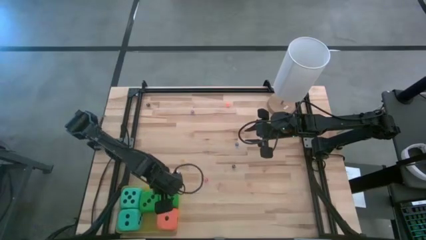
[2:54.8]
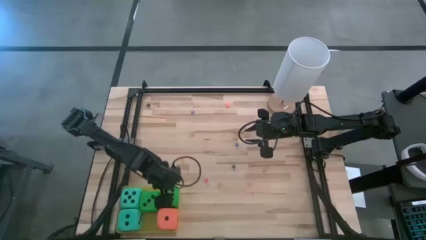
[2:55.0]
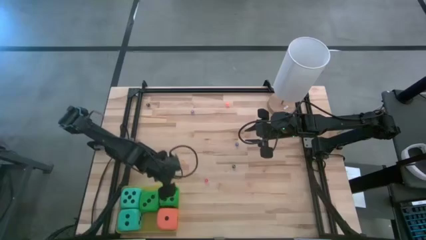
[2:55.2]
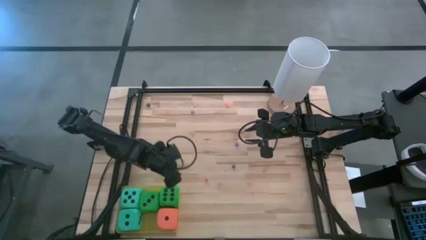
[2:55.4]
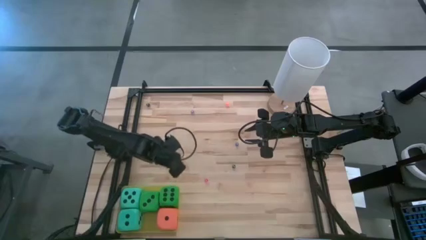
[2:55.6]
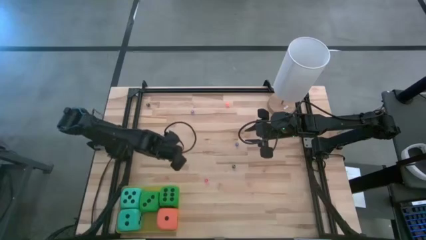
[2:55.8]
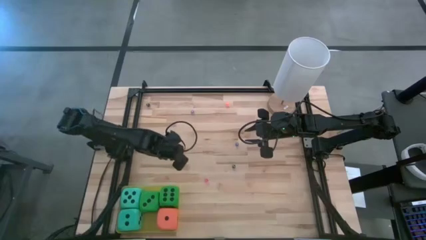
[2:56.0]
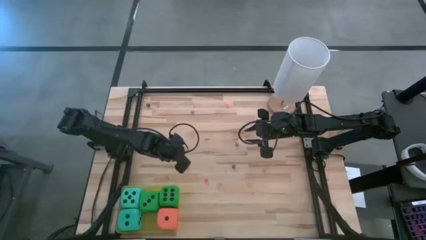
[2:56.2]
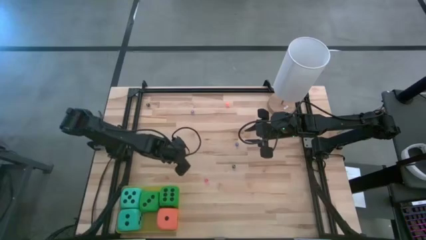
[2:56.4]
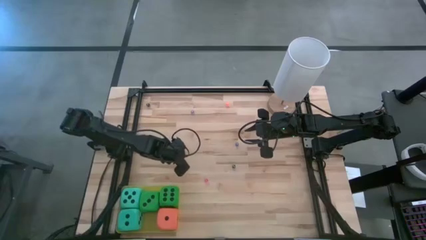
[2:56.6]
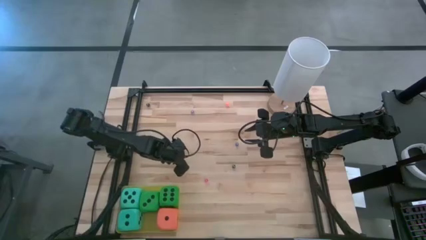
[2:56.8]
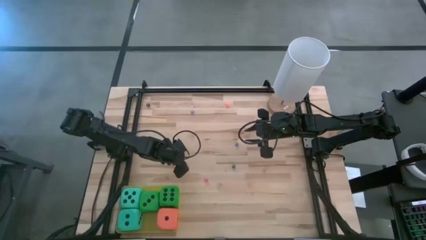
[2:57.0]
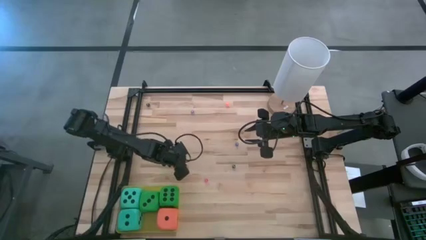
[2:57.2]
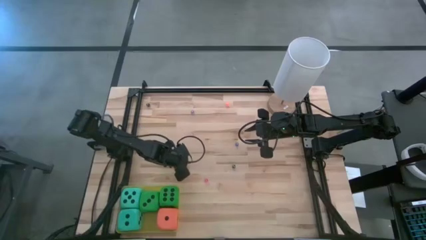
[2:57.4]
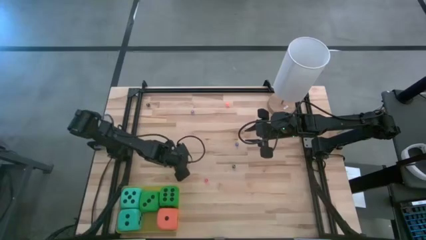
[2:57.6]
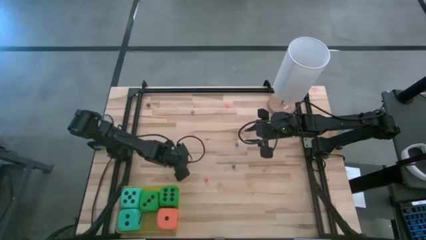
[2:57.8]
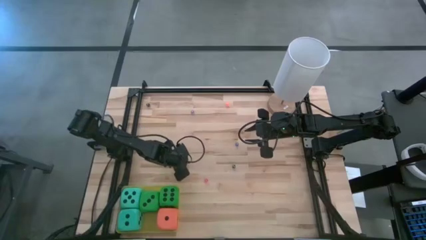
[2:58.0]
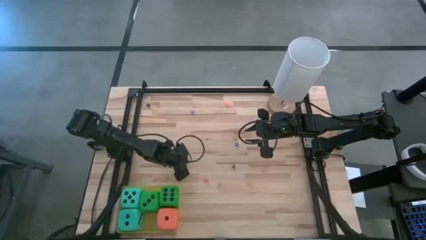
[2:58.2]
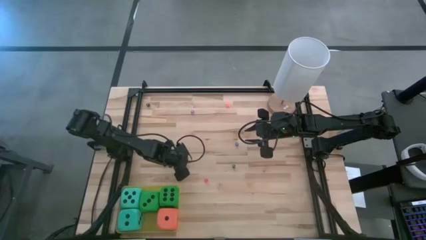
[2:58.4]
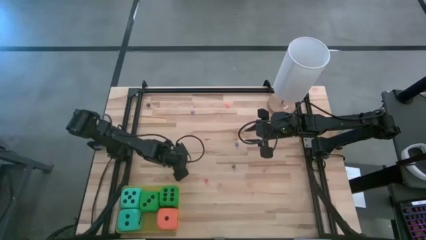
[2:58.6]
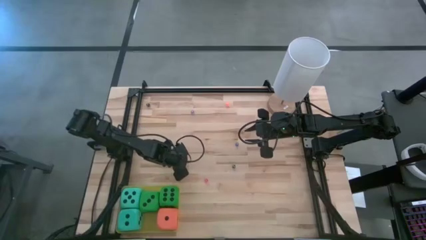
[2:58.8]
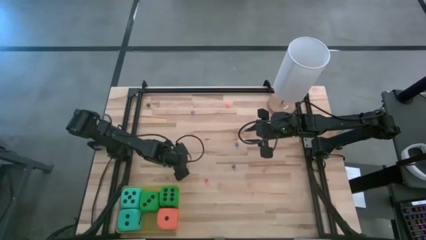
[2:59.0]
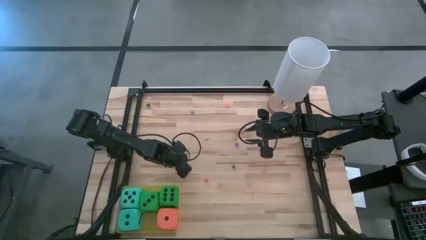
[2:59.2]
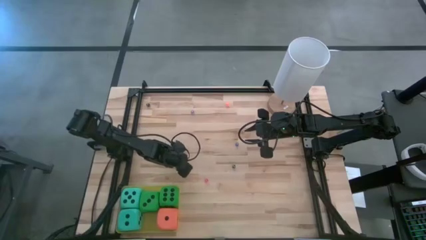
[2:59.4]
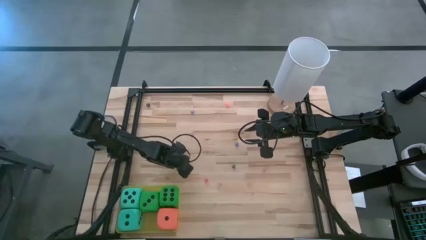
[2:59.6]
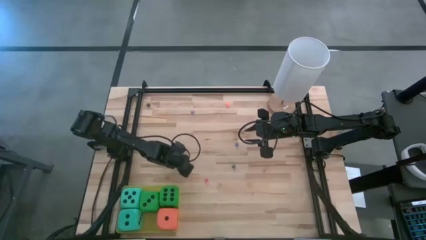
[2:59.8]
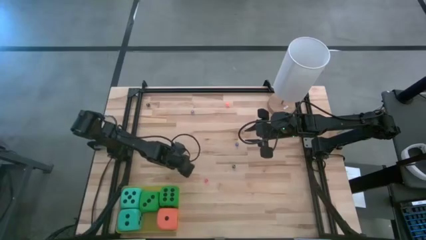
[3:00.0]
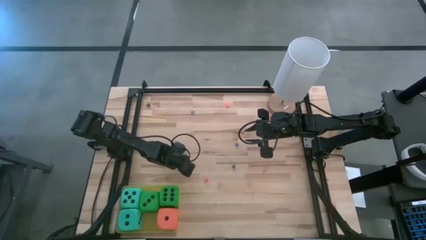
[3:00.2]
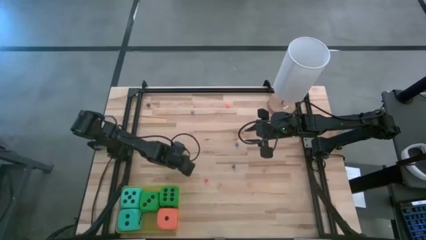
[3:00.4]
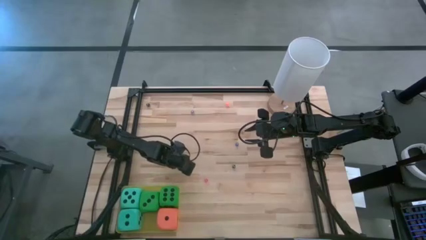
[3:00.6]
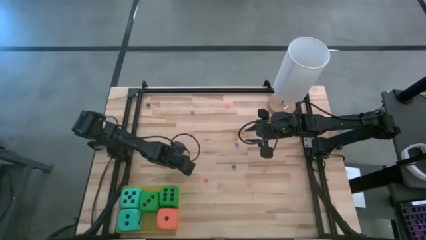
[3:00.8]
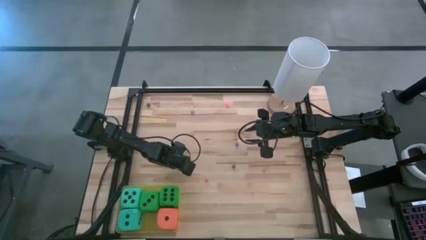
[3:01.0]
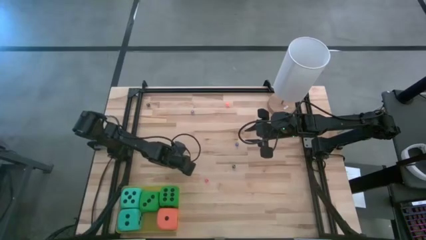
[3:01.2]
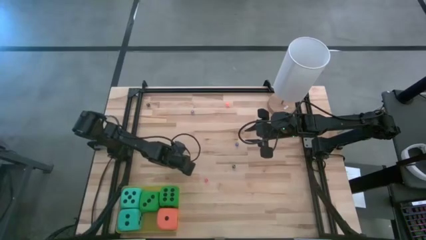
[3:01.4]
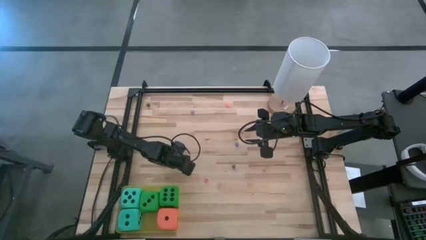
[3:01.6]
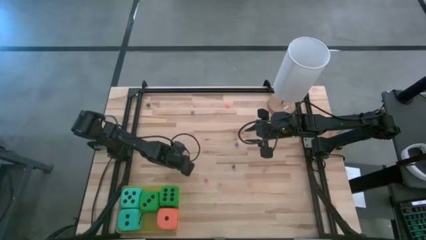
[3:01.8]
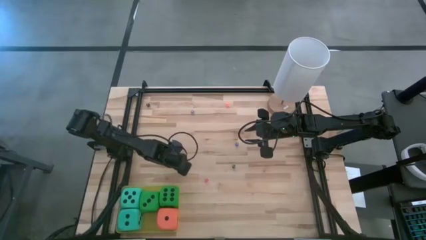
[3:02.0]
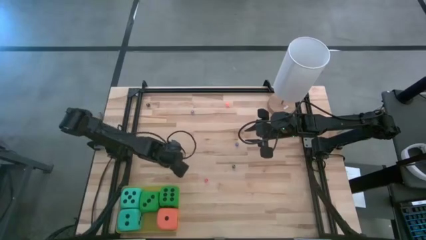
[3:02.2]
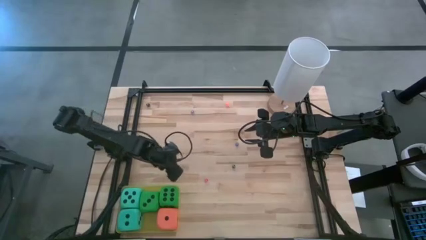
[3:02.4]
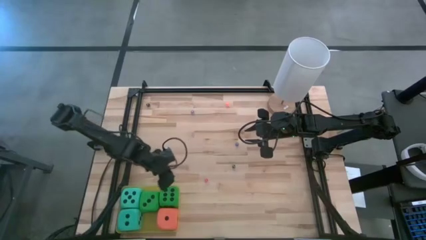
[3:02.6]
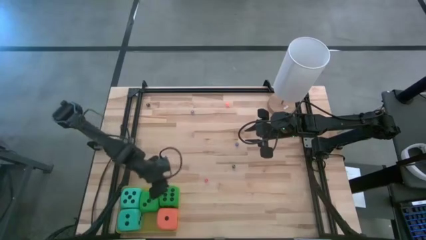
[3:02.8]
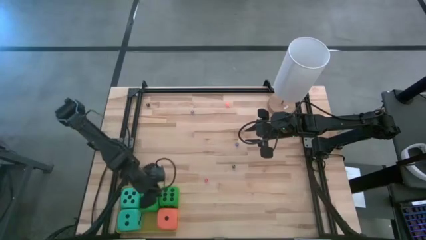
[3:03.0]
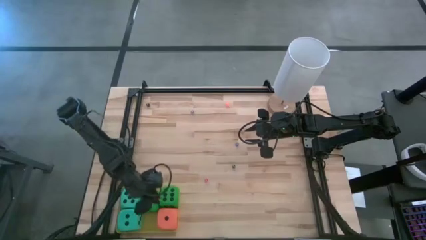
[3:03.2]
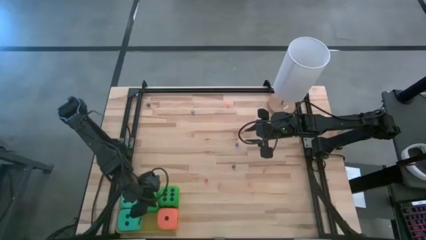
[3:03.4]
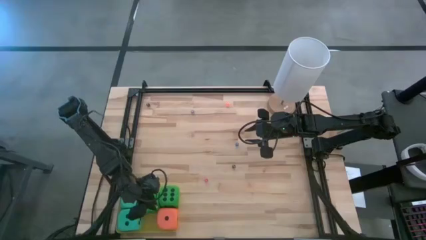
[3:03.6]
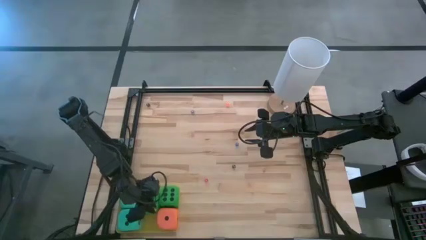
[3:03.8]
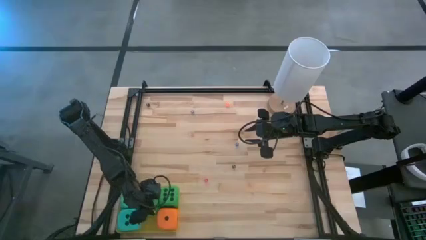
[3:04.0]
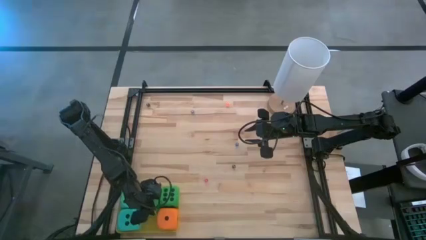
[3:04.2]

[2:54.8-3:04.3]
Task: Pick & Place Dice
Put the yellow dice into the yellow bin

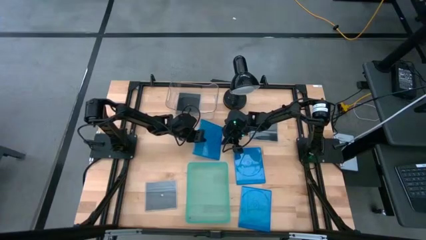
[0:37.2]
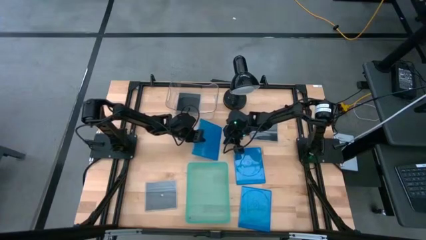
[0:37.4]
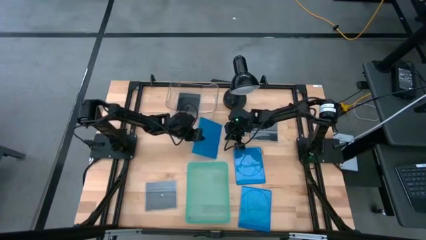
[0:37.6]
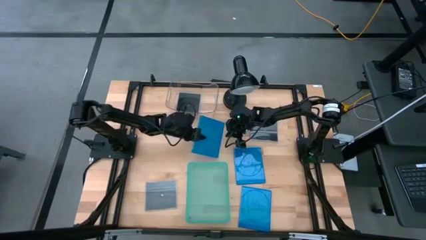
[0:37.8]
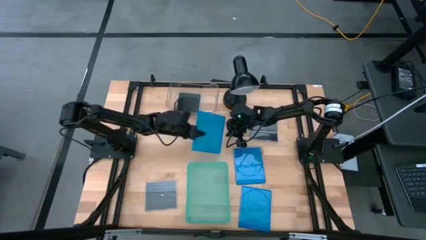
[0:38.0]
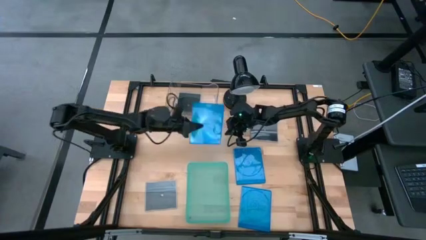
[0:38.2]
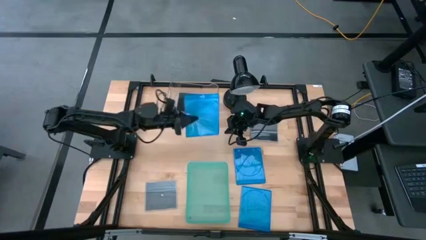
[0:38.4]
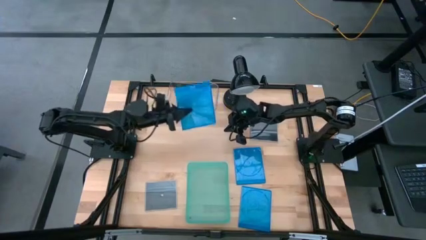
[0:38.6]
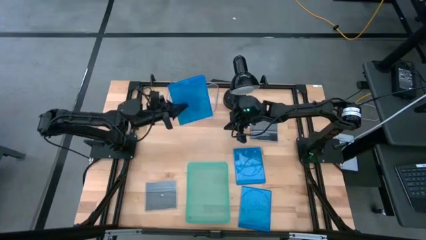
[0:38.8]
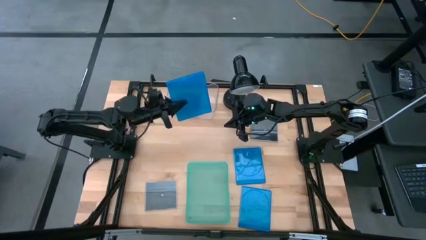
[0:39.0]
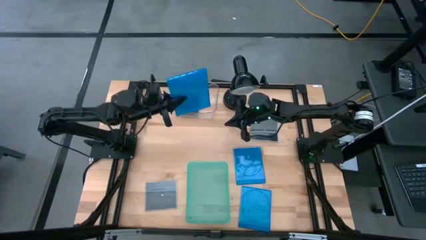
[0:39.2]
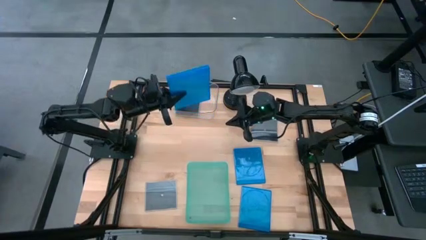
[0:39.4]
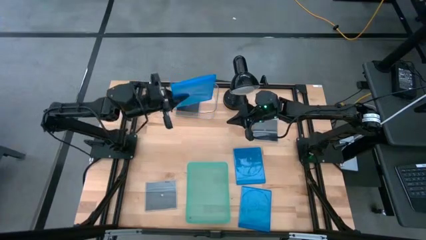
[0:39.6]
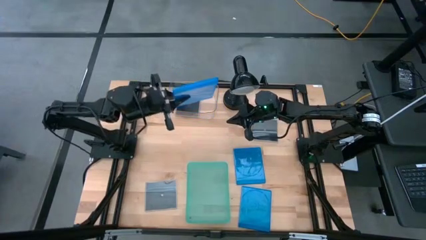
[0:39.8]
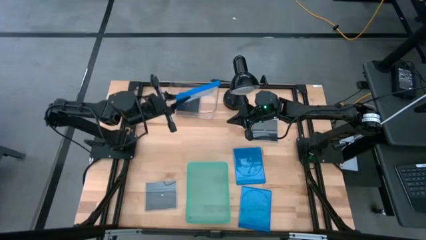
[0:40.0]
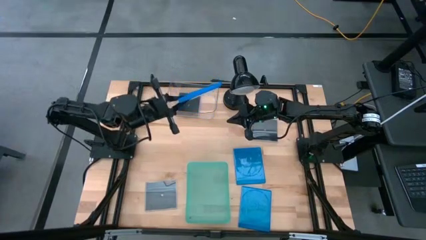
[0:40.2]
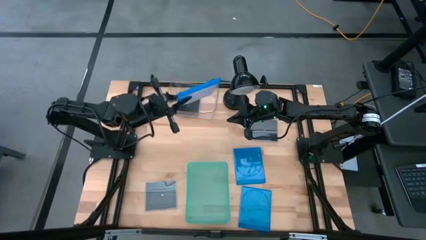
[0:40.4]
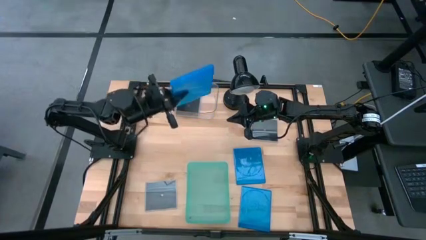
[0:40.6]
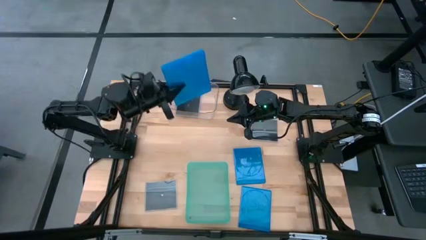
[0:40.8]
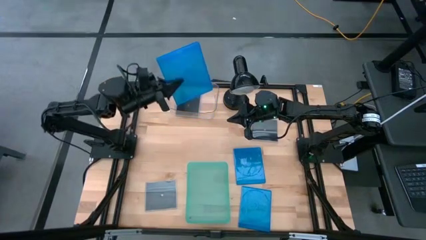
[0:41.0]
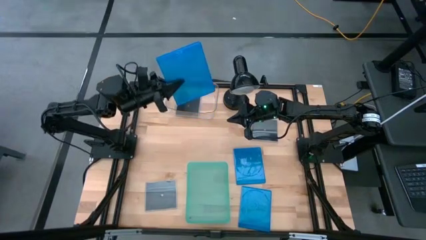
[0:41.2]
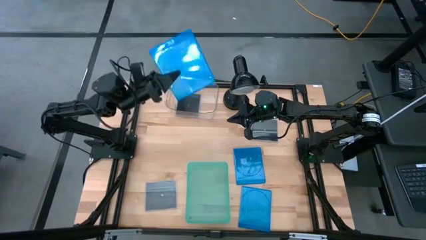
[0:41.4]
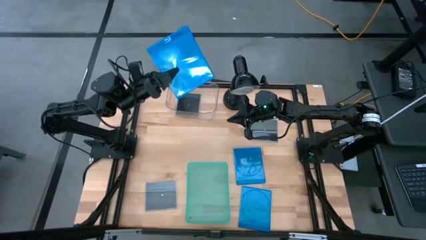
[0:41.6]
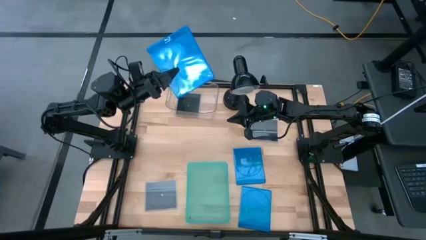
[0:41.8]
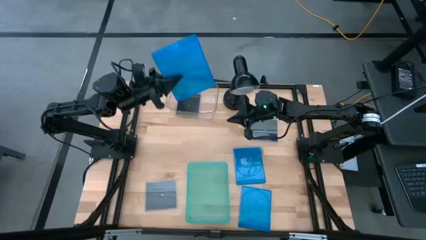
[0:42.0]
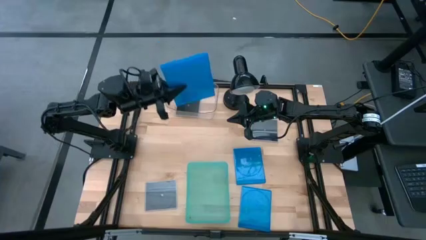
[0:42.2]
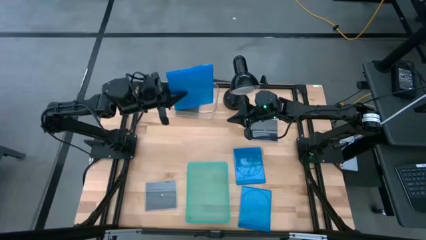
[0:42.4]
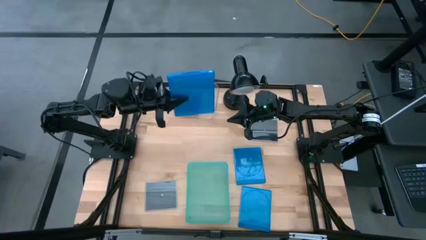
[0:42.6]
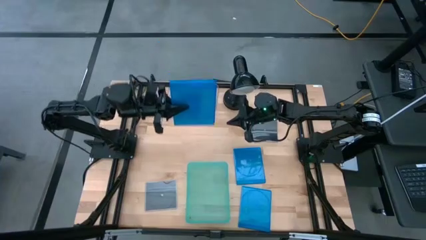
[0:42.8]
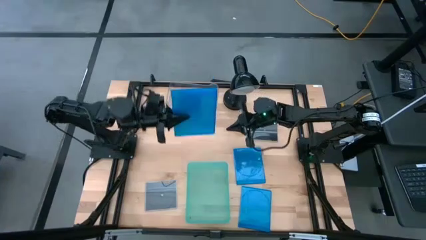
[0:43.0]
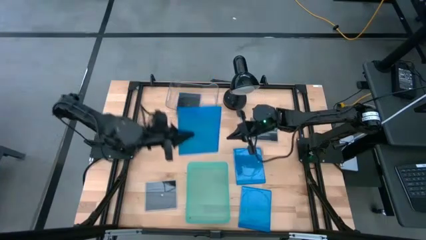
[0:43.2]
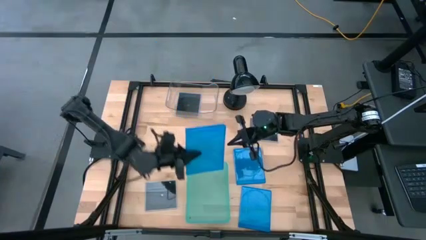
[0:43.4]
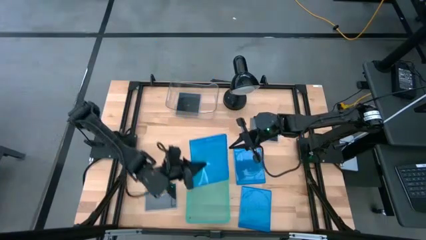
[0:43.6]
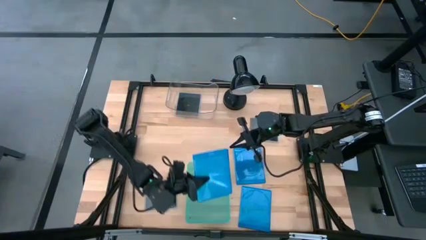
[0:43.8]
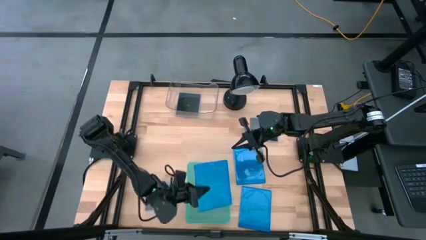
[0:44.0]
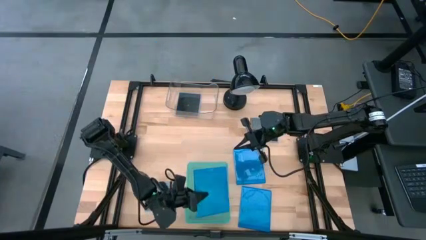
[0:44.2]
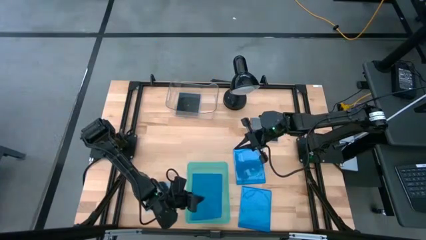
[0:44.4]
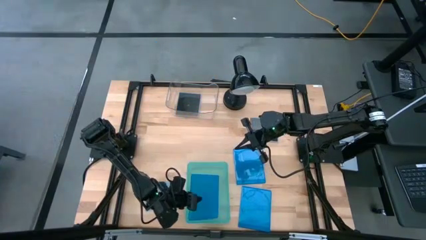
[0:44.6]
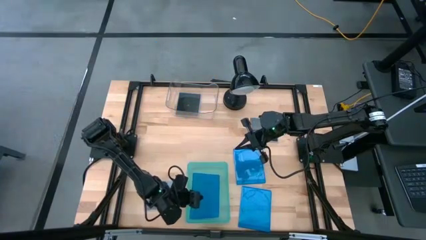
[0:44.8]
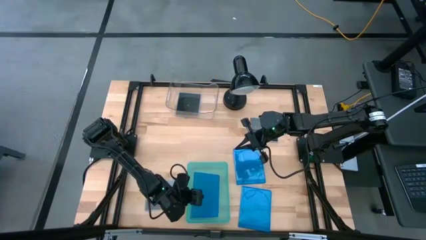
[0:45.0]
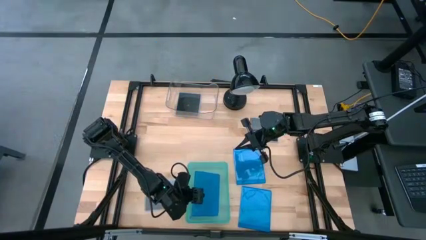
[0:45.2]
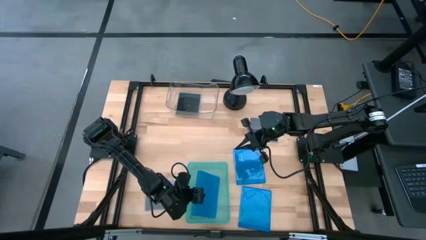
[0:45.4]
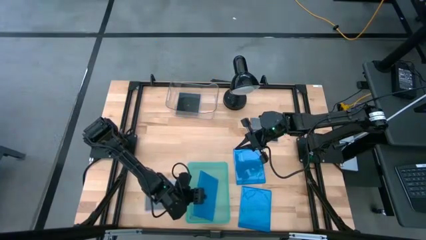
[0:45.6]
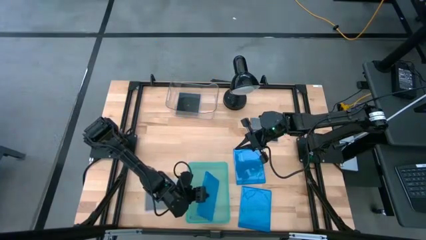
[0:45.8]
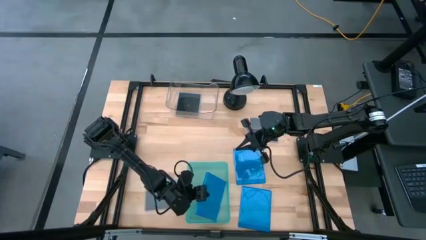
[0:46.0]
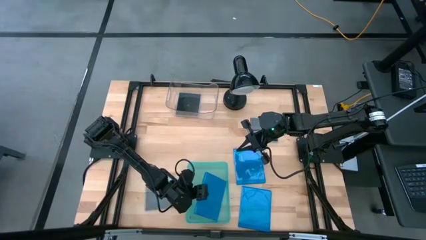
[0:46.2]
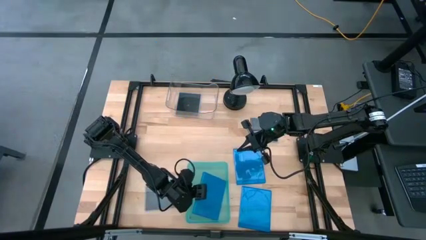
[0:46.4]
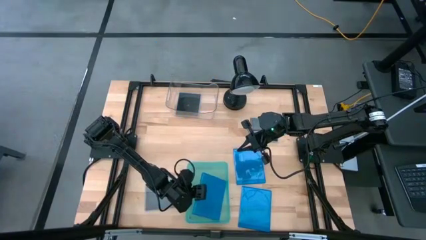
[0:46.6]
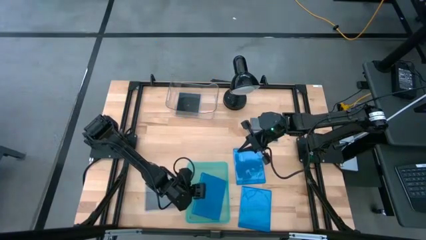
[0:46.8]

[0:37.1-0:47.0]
Task: Pick & place jewel cases by type
Put the middle left blue CD case into the green bin
